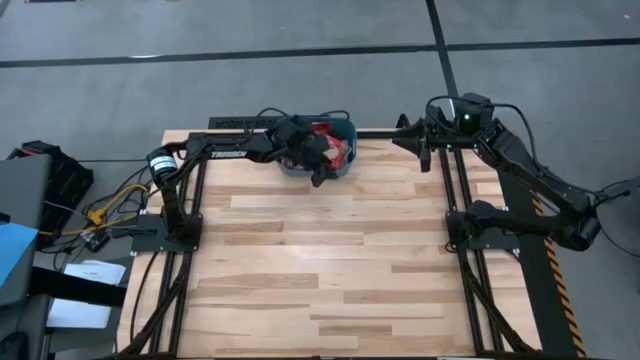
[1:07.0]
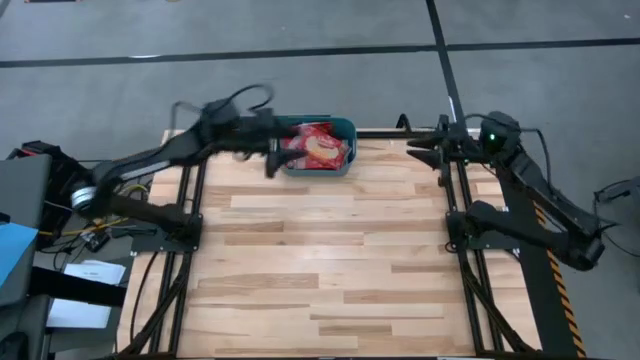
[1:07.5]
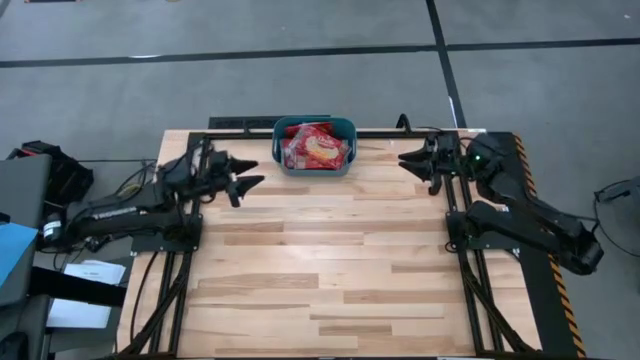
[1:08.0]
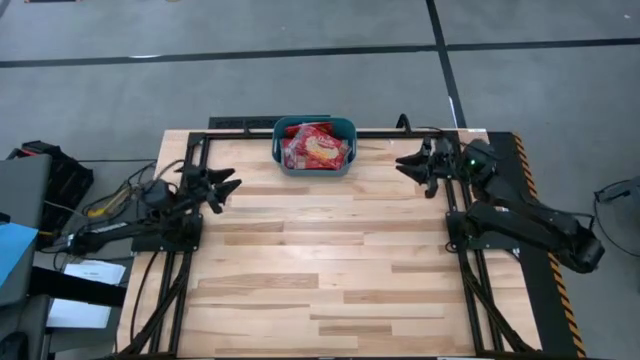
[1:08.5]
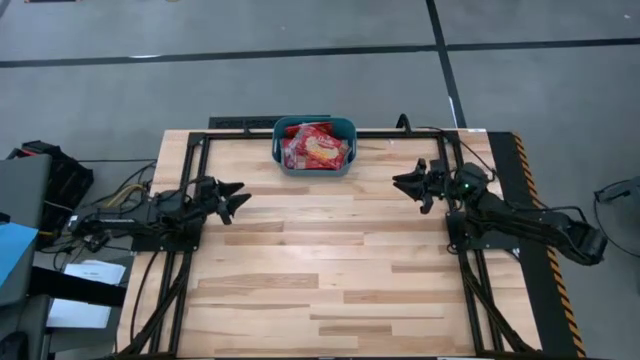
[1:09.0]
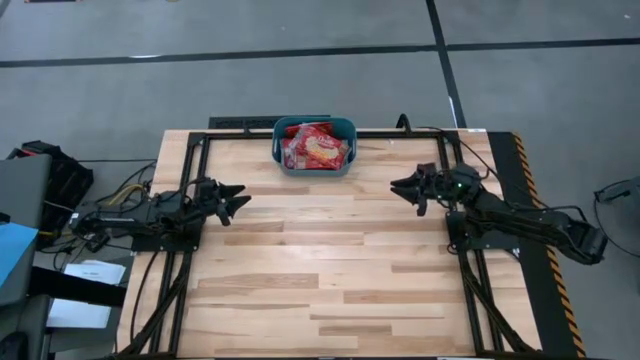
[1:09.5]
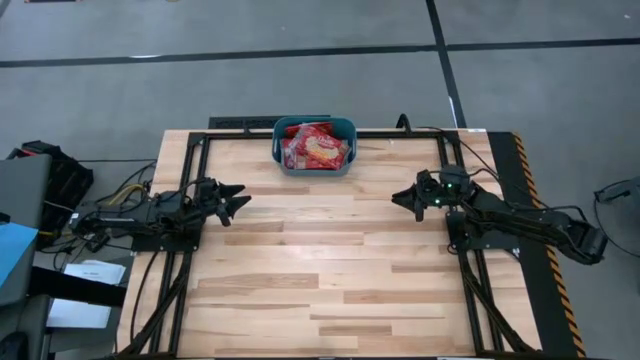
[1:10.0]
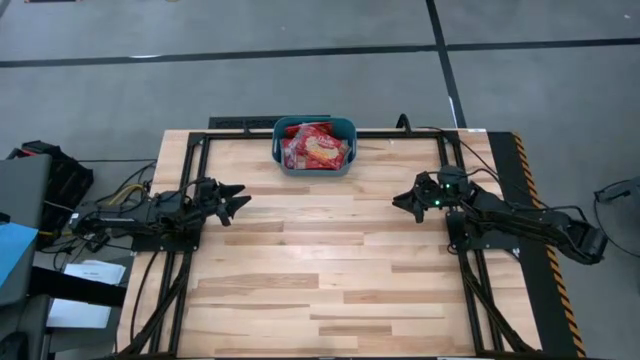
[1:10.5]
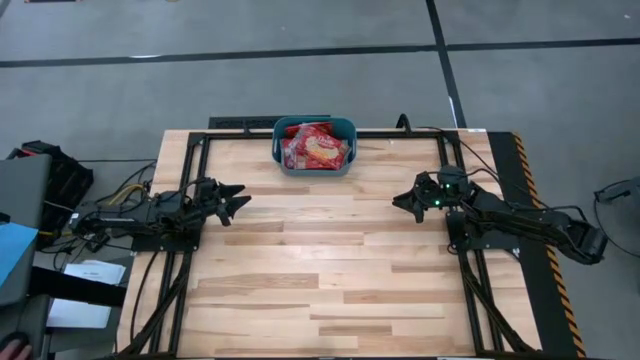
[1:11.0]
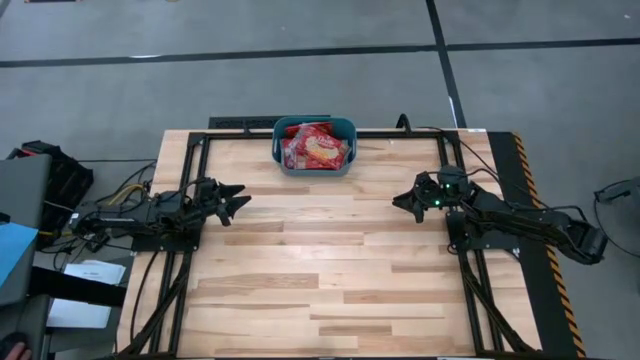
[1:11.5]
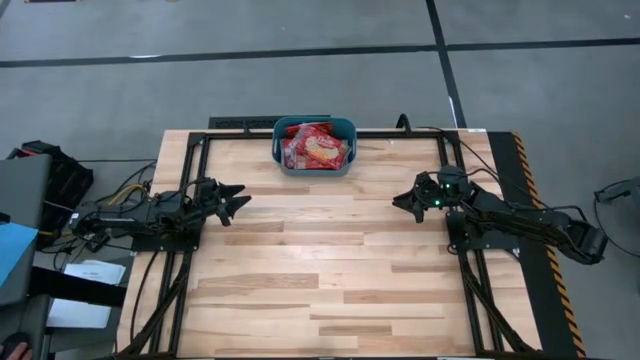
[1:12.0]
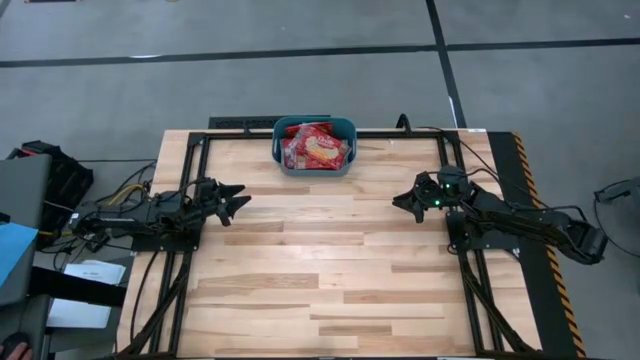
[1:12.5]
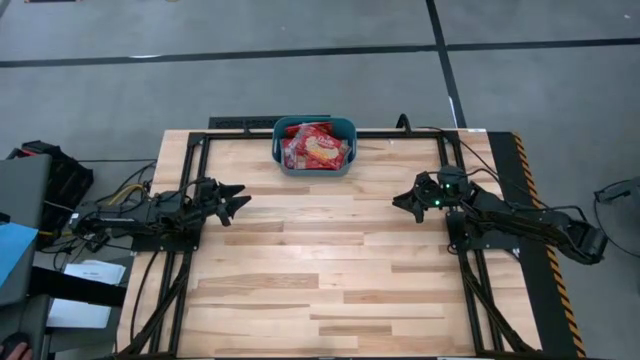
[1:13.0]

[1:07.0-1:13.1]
Task: Sort popcorn bags into baskets
Return to Home Position

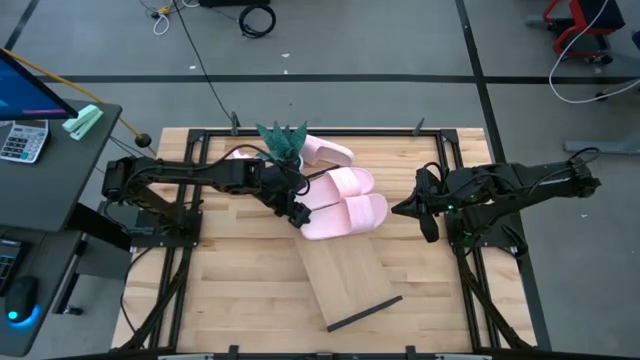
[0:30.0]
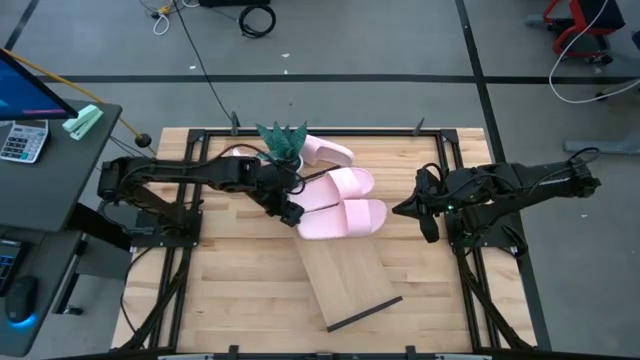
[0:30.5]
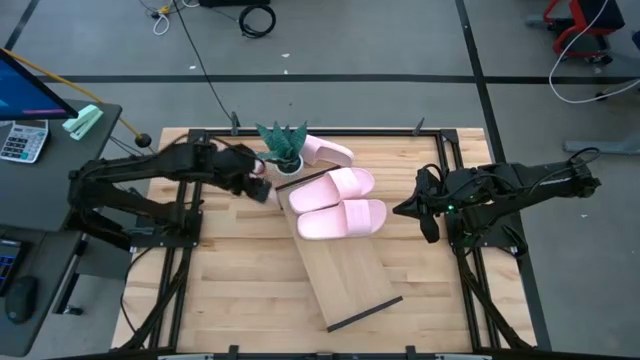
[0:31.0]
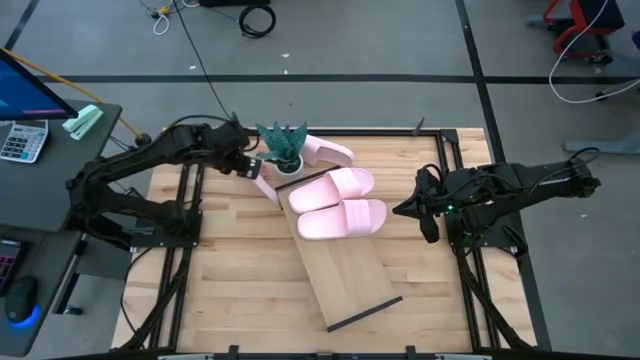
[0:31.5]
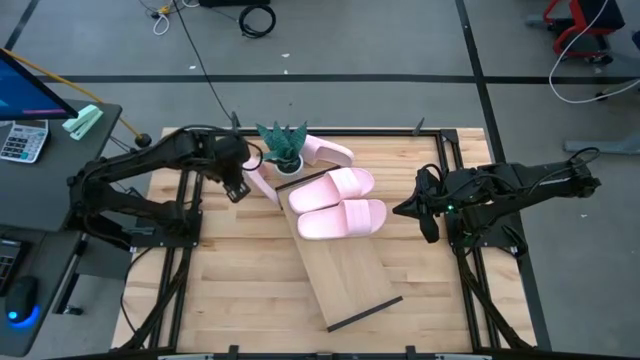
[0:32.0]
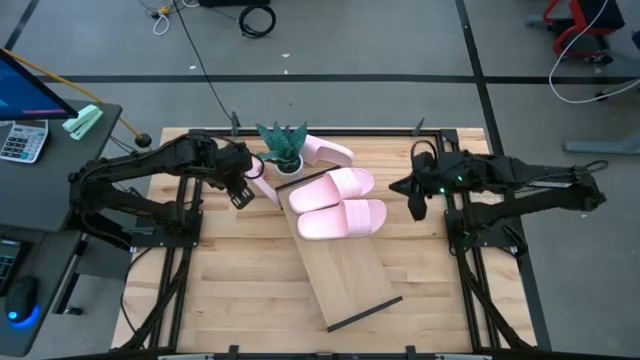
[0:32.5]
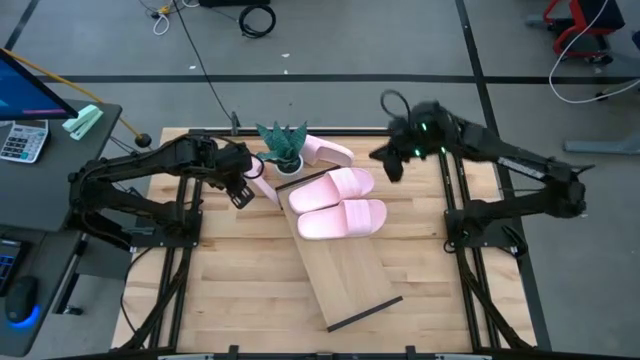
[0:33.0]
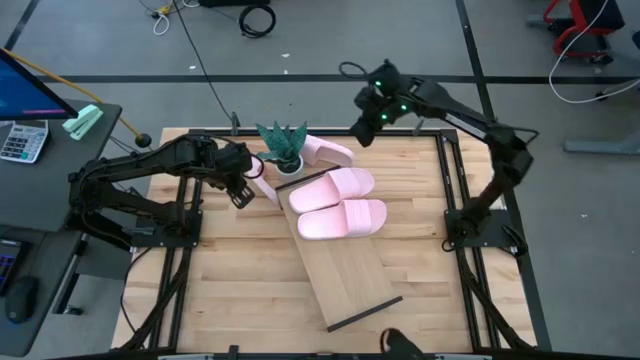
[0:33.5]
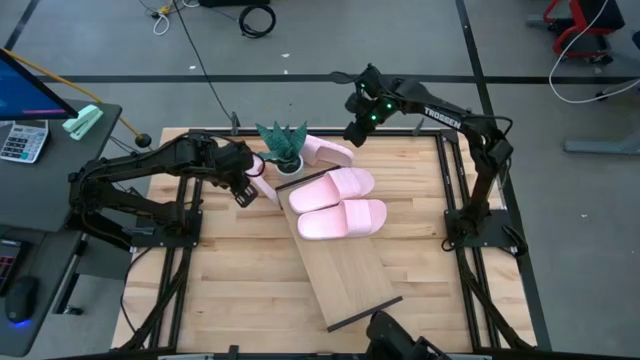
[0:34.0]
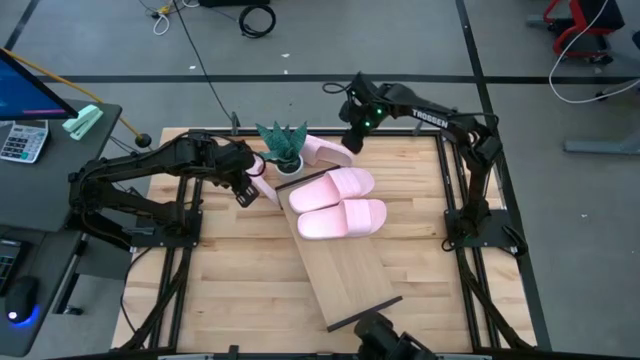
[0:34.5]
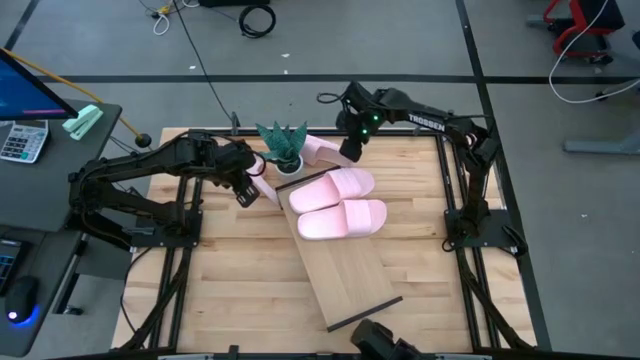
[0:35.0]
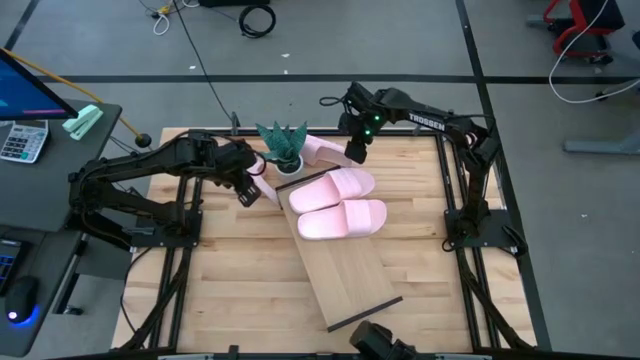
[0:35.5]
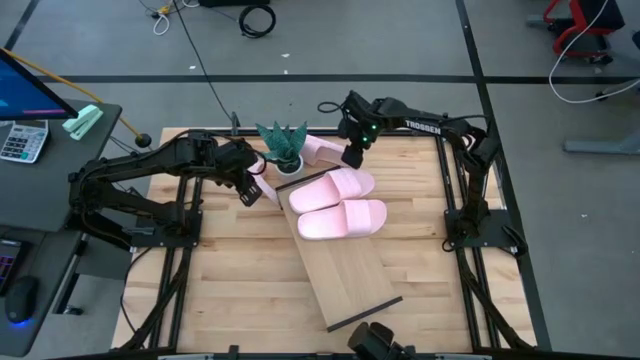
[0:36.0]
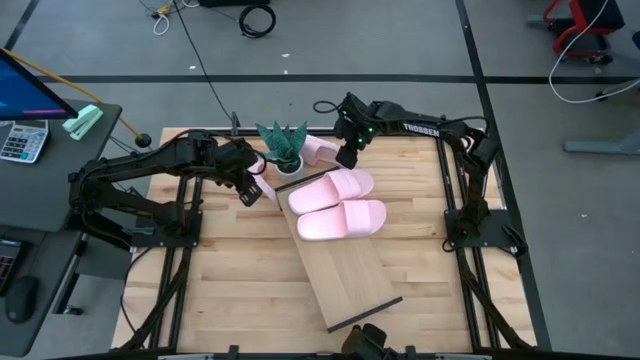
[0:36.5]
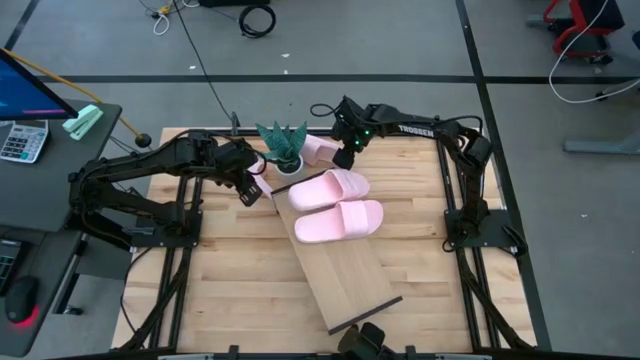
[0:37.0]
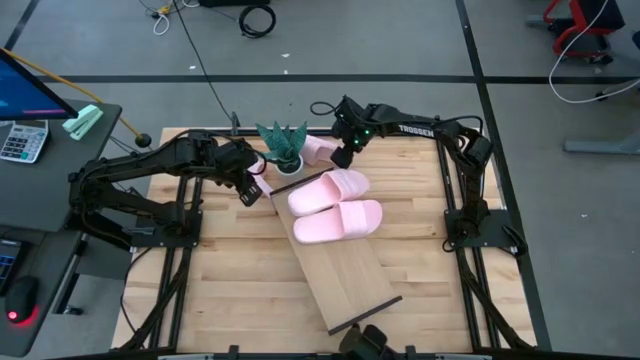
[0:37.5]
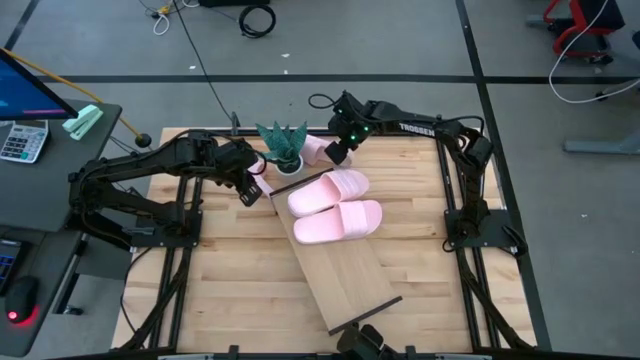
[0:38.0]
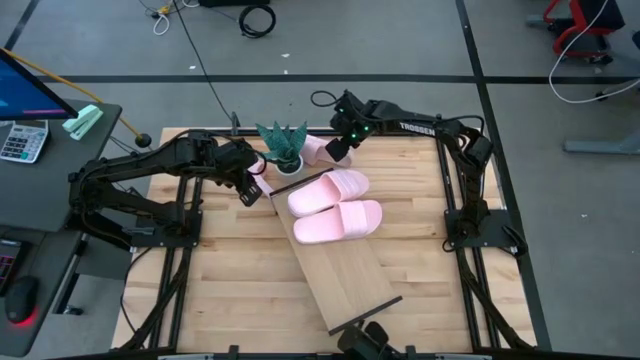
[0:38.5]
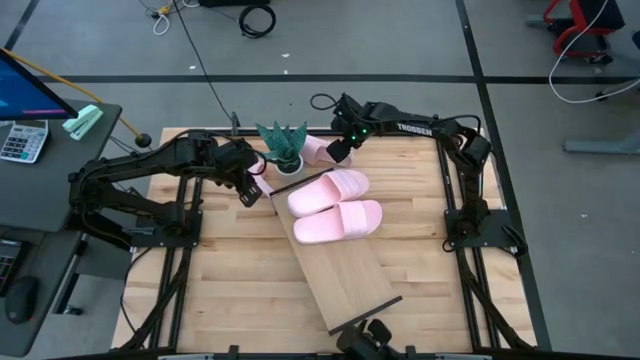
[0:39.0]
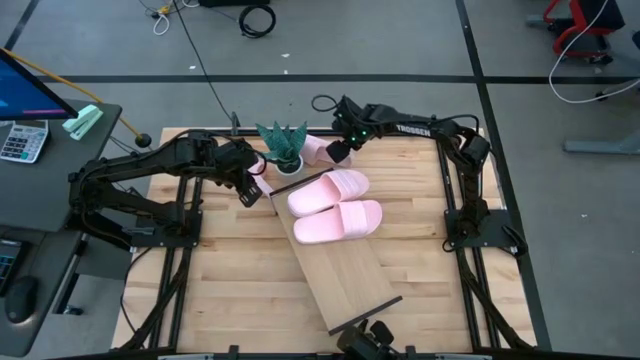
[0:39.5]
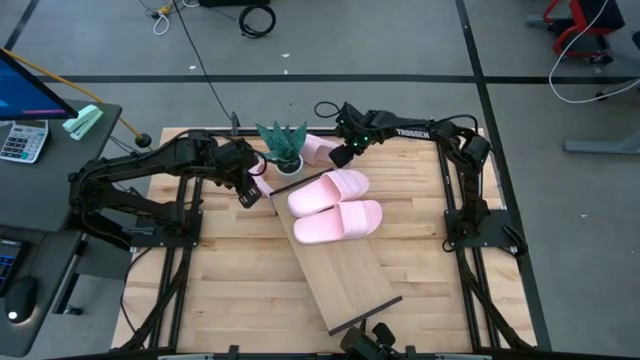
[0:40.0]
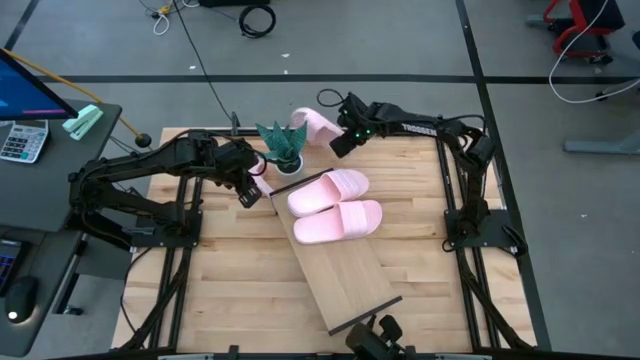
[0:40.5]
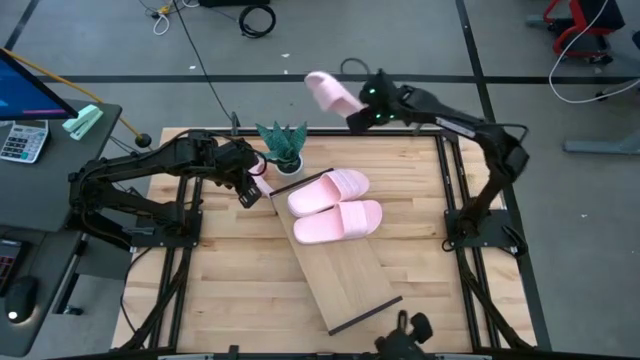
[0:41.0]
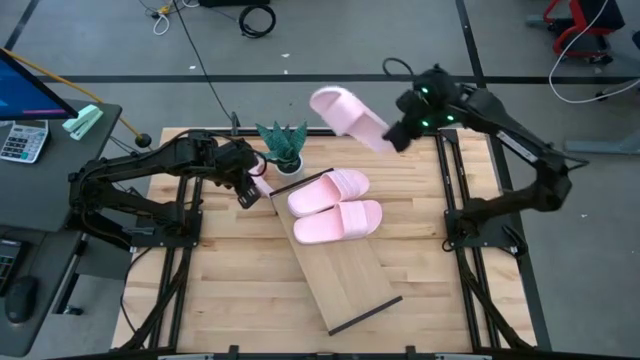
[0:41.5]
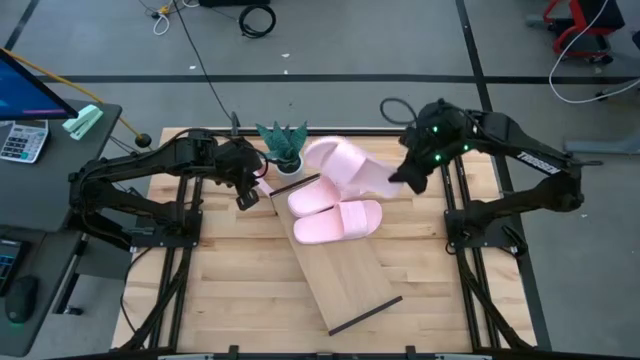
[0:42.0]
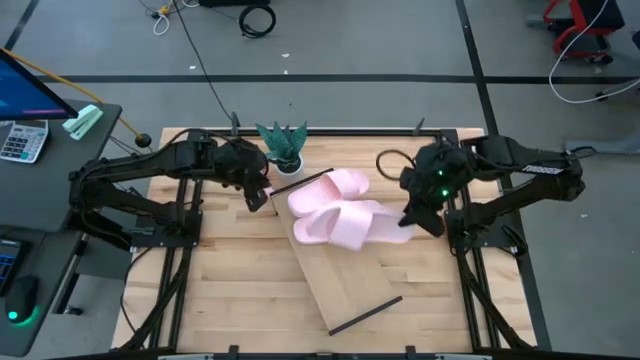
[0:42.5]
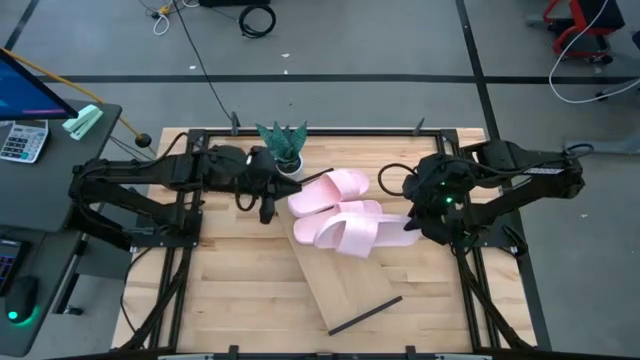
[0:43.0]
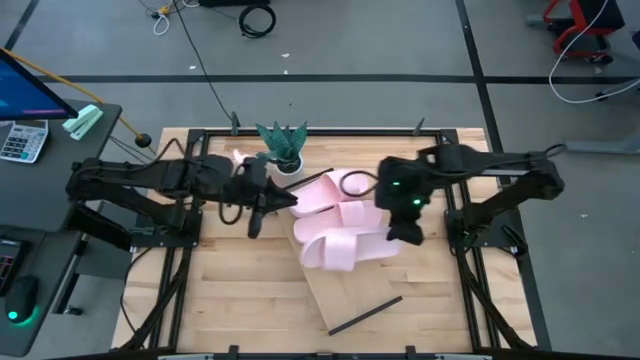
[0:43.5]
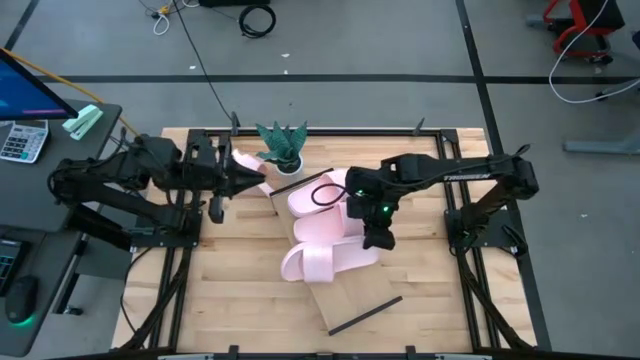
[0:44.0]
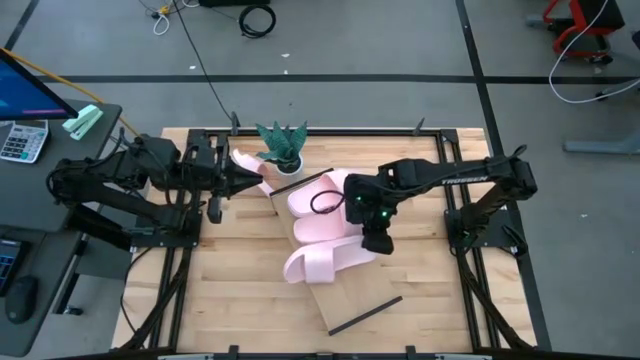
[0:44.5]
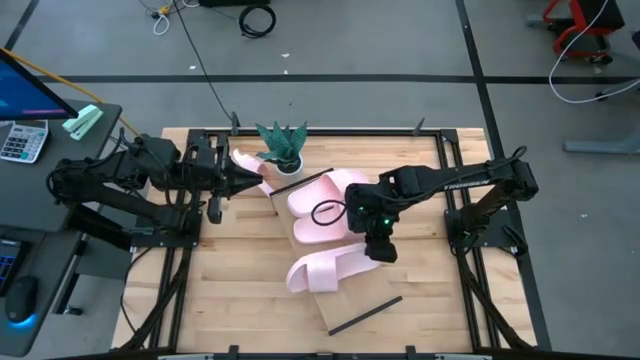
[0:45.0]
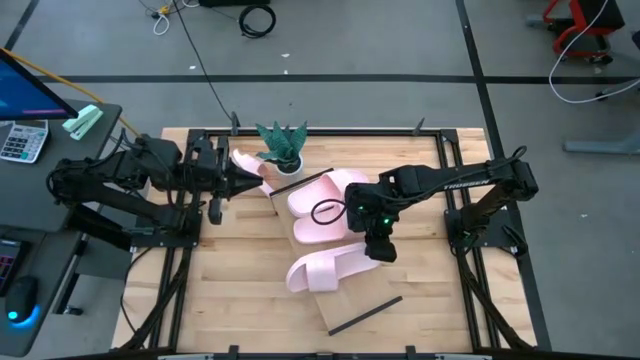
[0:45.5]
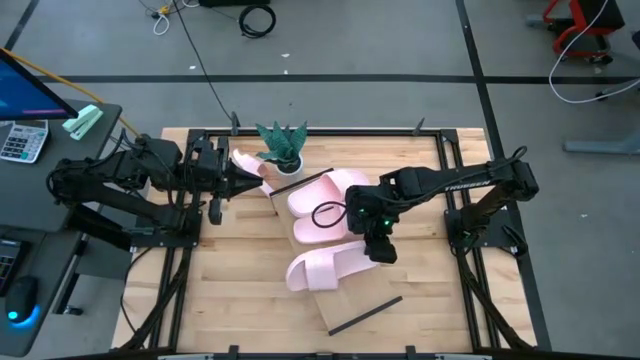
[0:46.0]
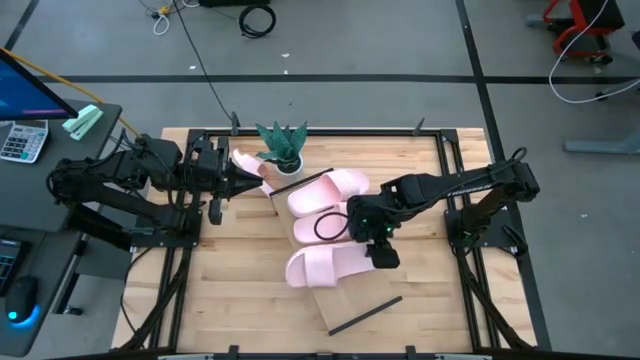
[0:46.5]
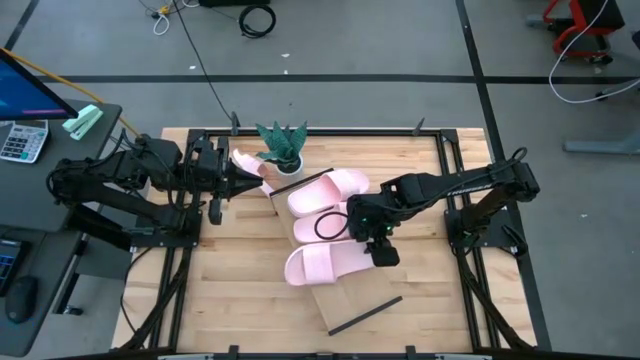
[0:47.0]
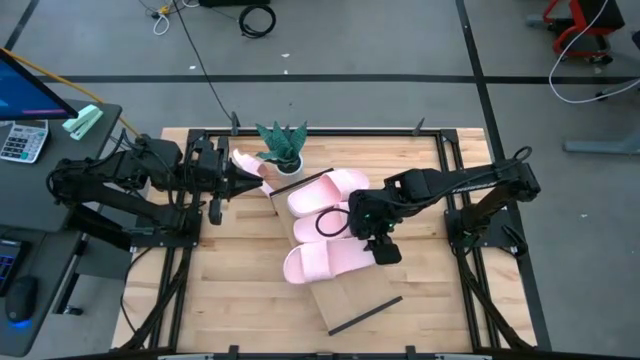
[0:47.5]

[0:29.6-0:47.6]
Task: Pick and place slides into the shelf
Put the right pink slipper on the shelf
